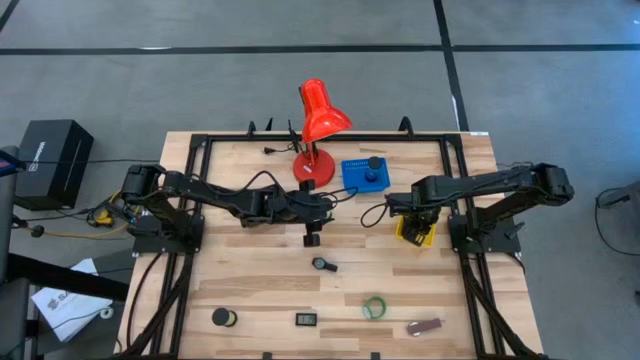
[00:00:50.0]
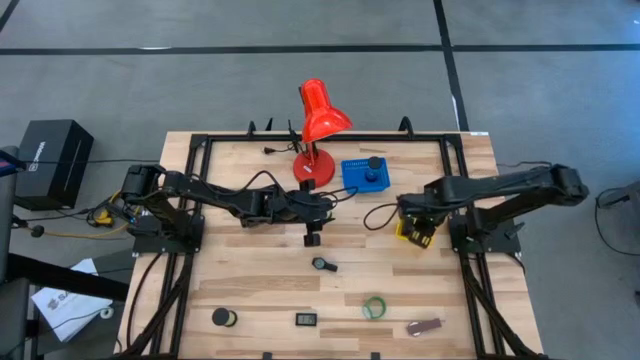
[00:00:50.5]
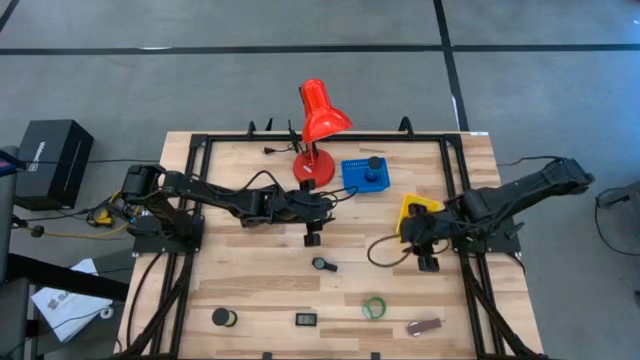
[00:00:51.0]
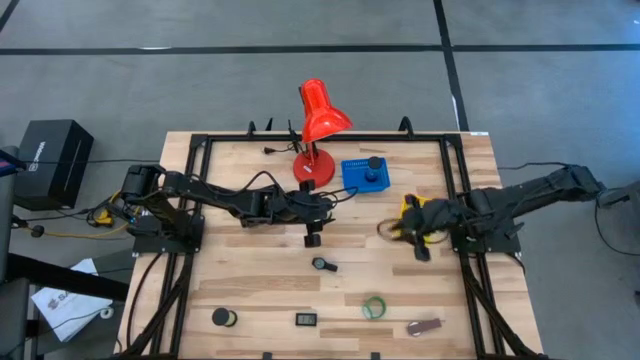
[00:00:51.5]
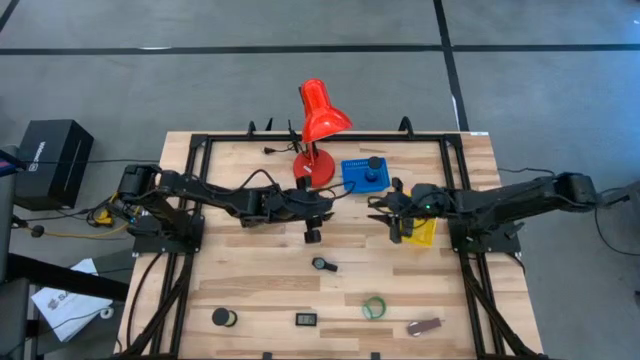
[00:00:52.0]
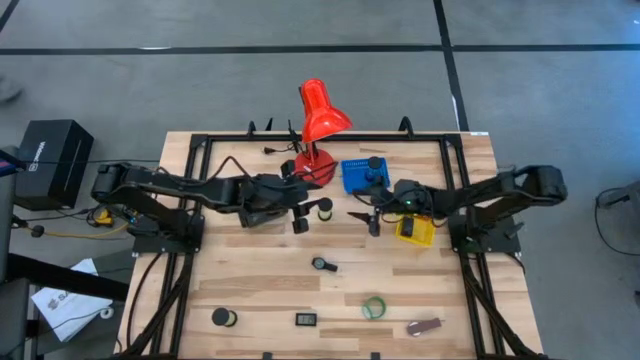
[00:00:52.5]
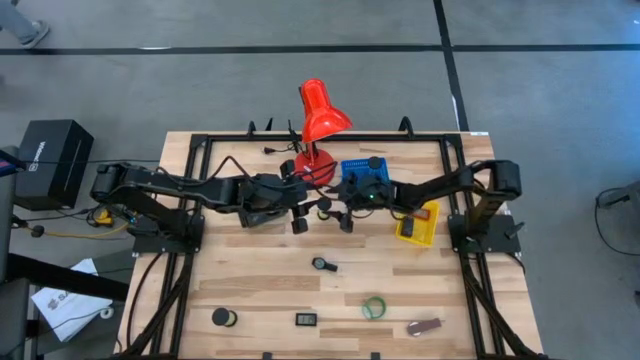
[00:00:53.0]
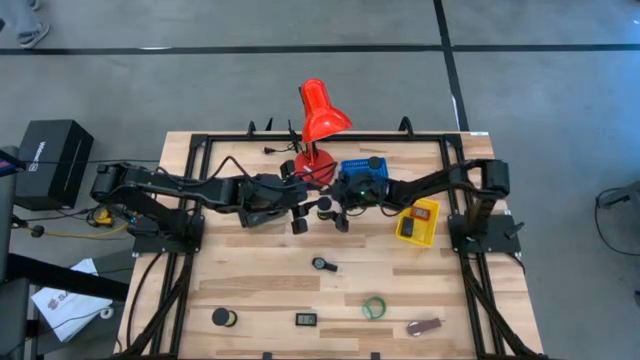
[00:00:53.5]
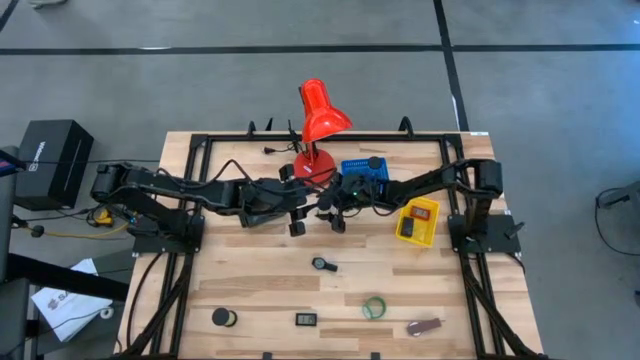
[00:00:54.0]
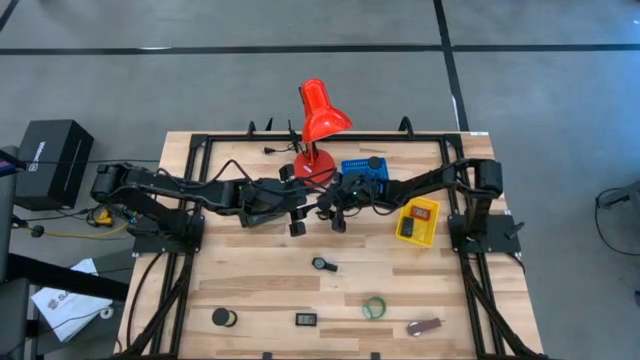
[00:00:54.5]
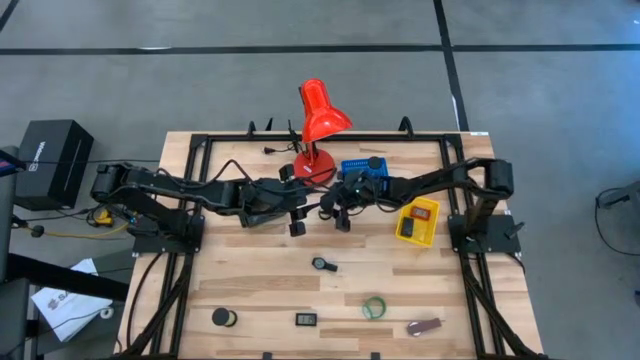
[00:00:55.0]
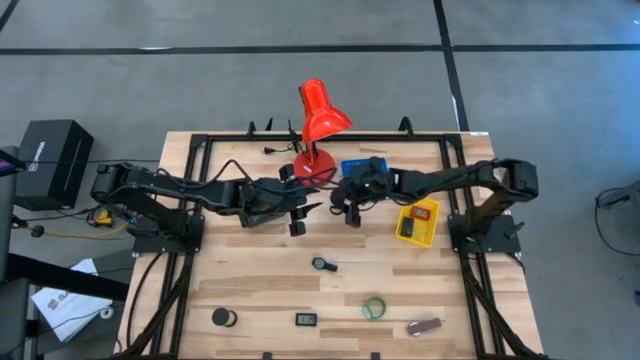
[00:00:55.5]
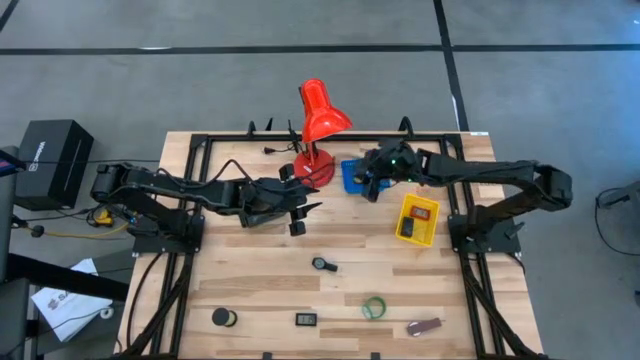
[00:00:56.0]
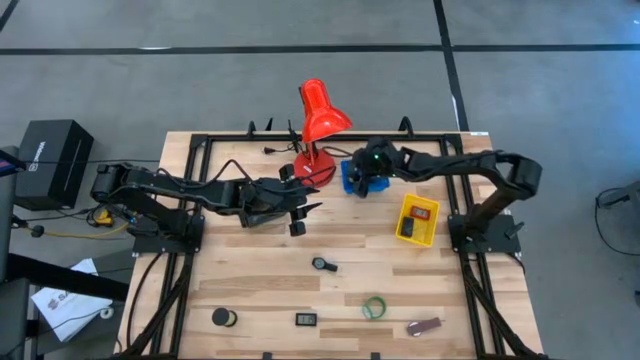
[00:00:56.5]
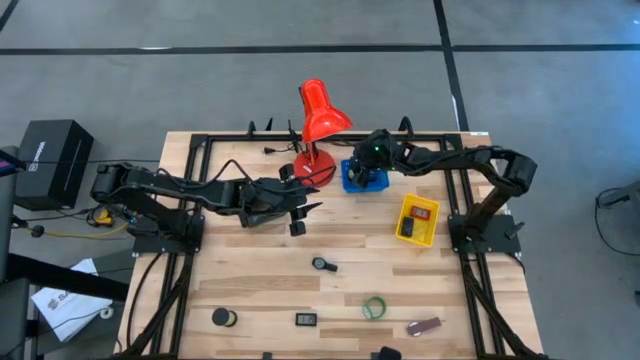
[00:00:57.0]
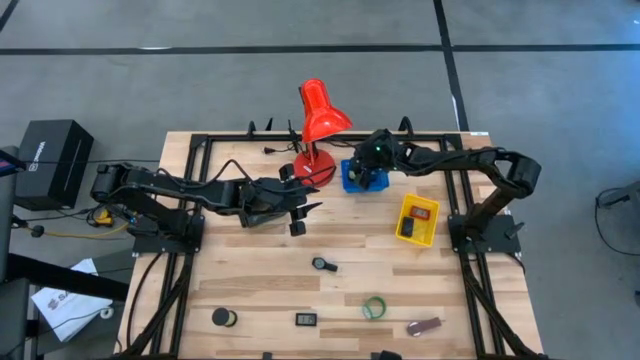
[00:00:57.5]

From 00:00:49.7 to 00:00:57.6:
Task: Pick & Place Office items
Put the top light green hourglass into the blue basket

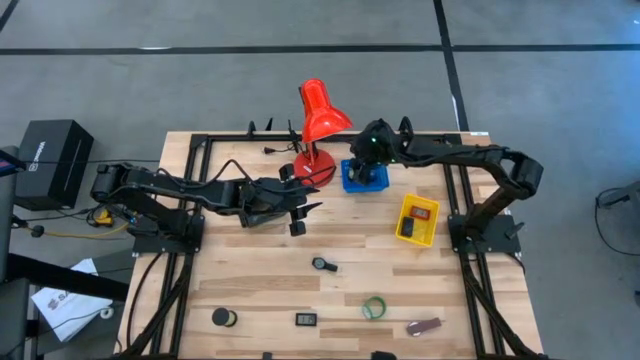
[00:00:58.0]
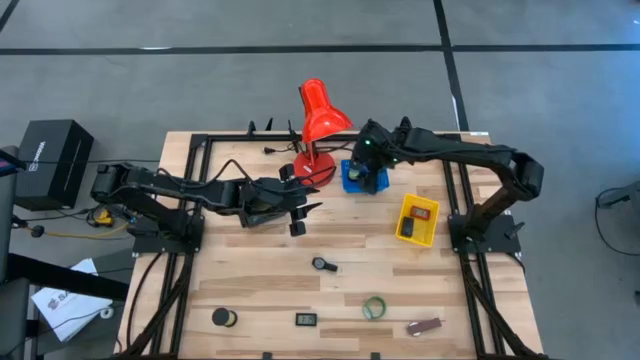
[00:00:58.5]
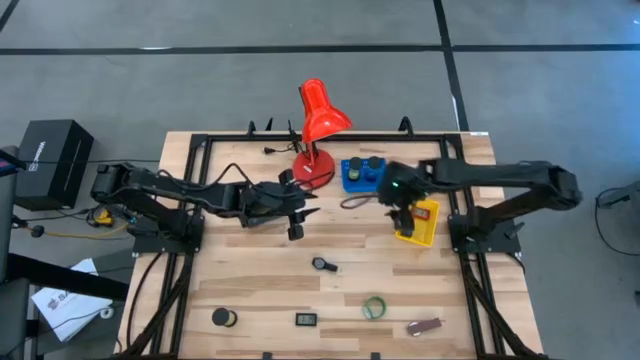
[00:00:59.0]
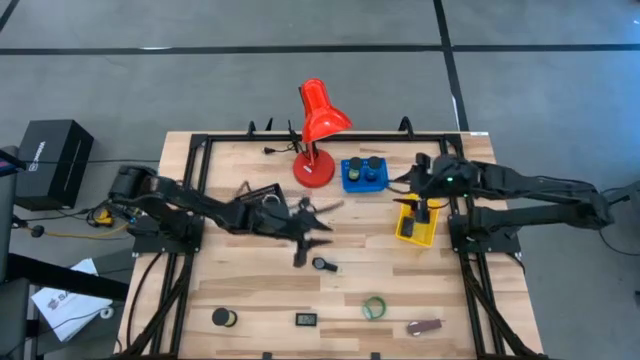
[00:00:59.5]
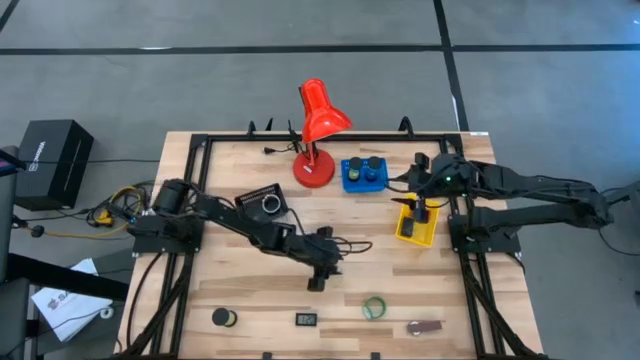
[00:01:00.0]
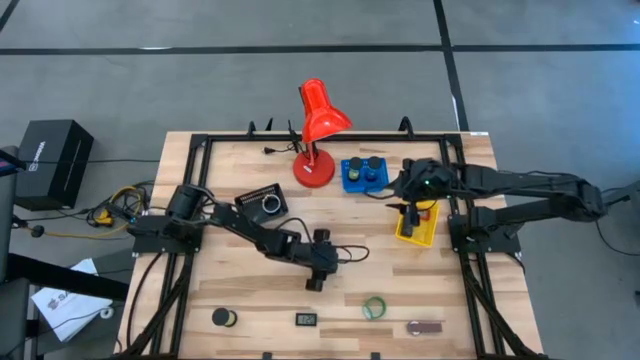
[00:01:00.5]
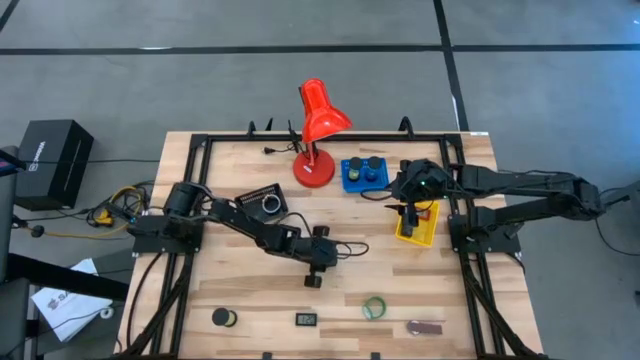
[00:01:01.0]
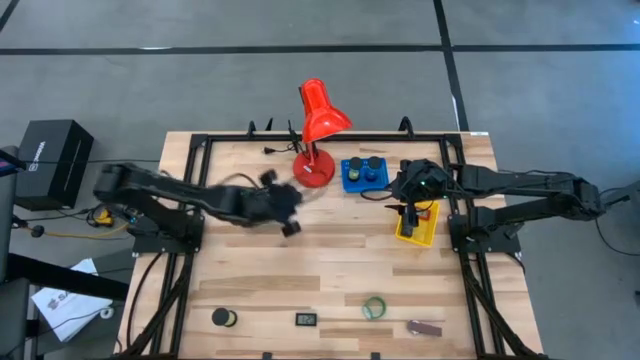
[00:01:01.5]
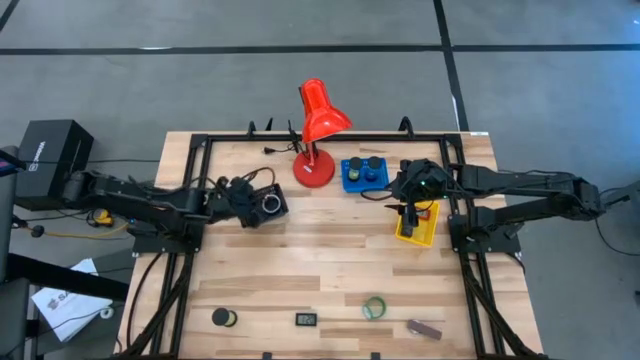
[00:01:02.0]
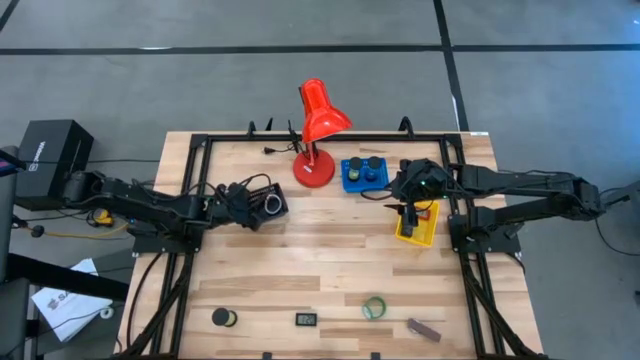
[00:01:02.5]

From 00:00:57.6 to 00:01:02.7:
Put the black wristwatch into the black basket

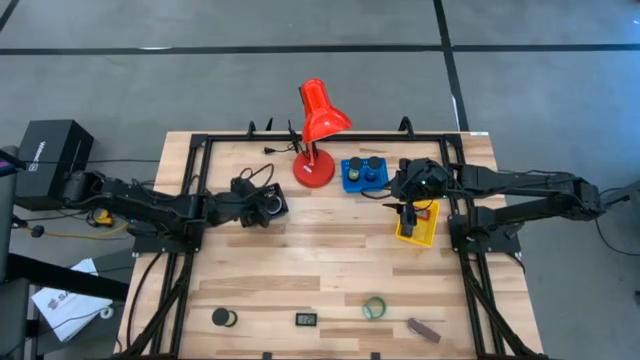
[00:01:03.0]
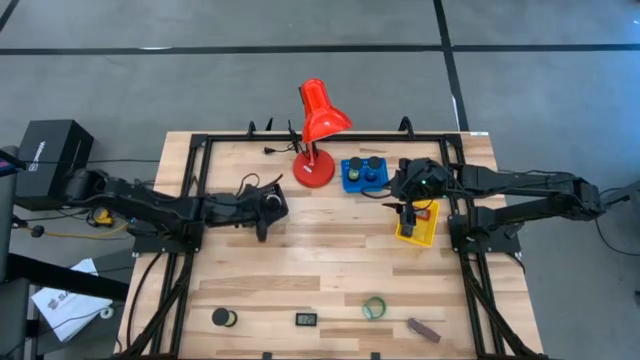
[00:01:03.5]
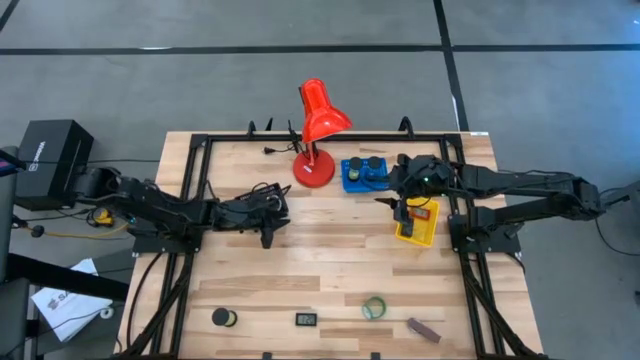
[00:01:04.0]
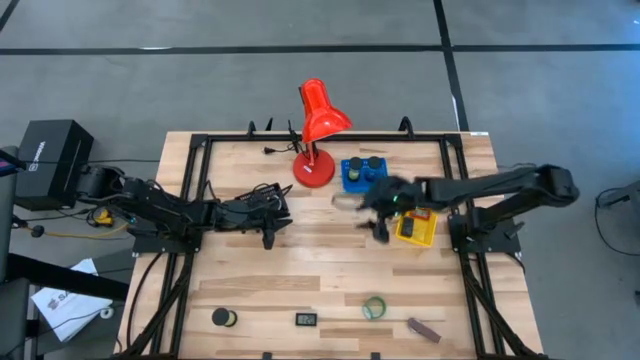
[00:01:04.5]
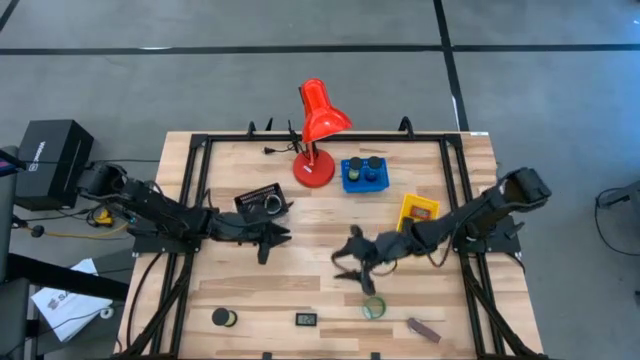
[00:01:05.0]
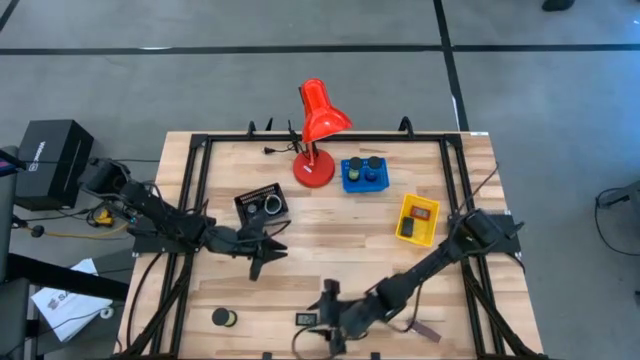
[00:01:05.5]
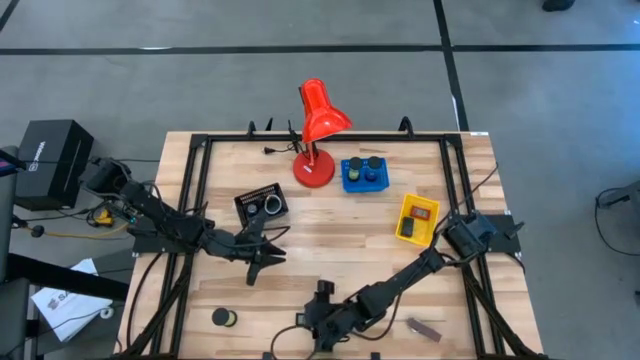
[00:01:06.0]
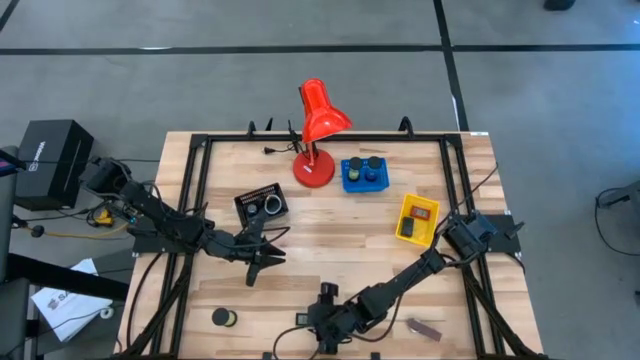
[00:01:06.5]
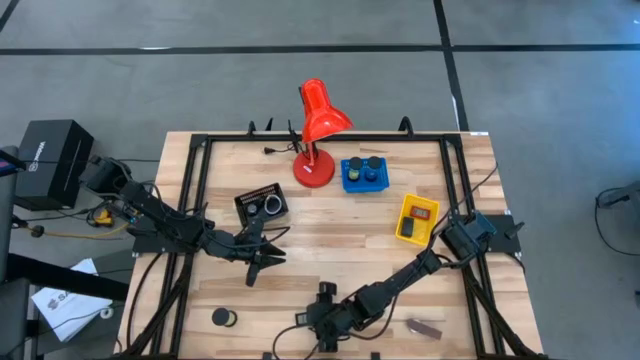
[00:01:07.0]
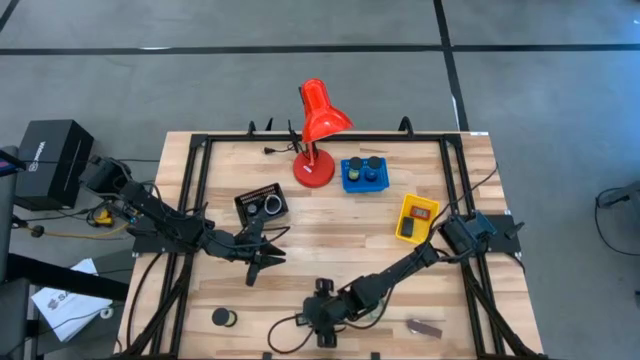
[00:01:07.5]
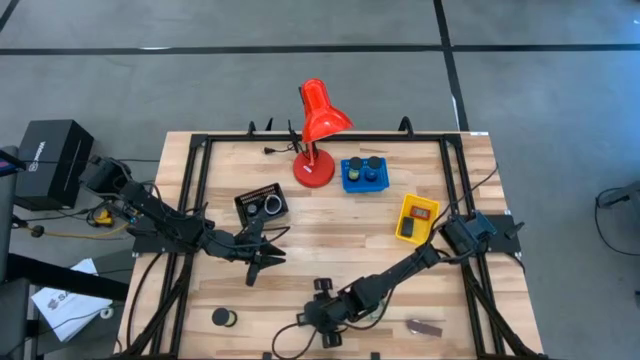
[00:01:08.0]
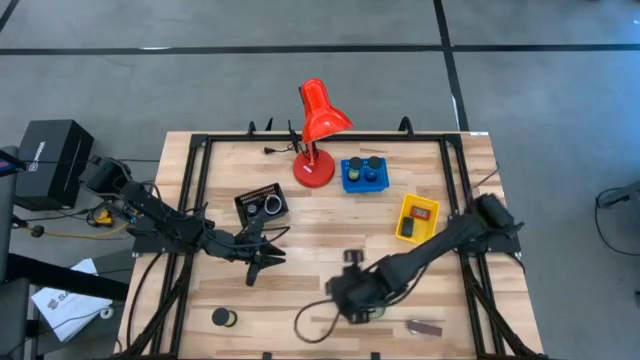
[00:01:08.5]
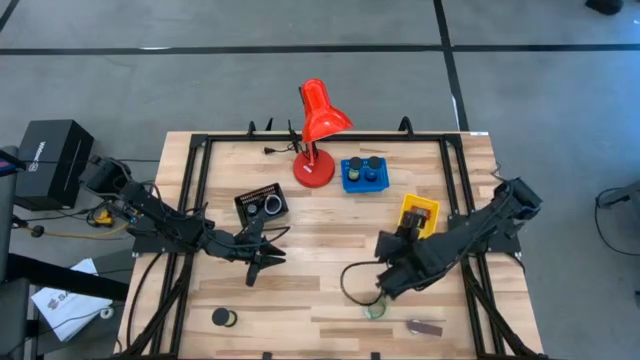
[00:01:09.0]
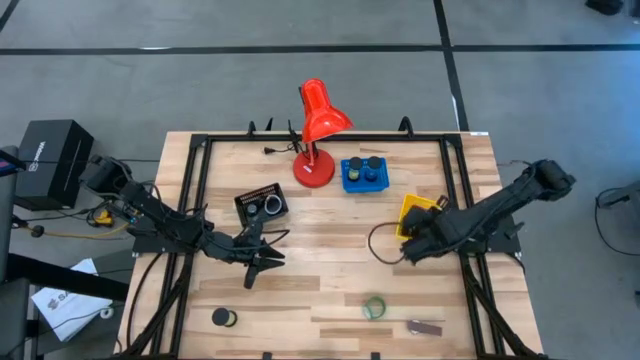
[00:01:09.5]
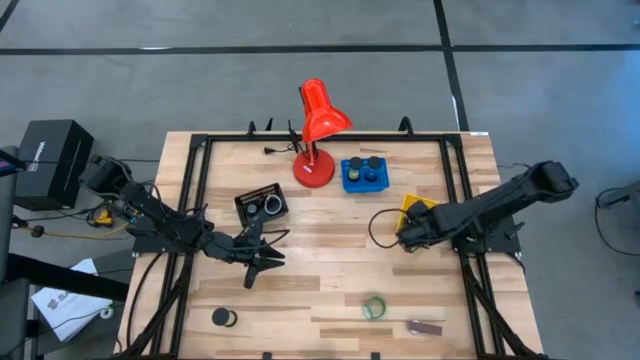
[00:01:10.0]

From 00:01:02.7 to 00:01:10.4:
Put the black digital clock into the yellow basket
